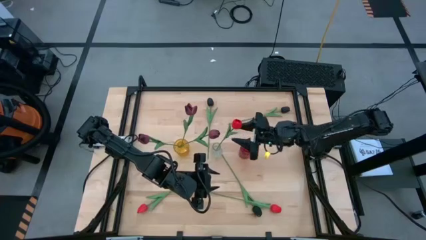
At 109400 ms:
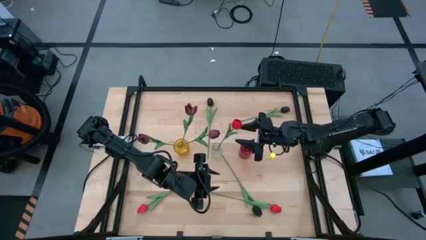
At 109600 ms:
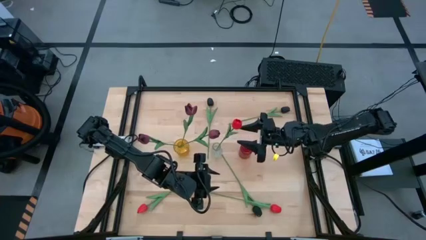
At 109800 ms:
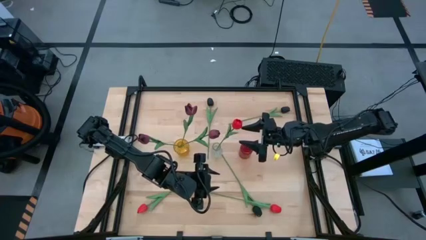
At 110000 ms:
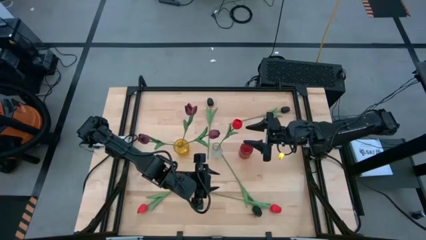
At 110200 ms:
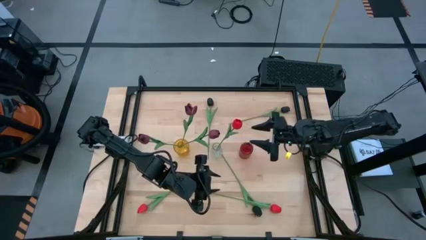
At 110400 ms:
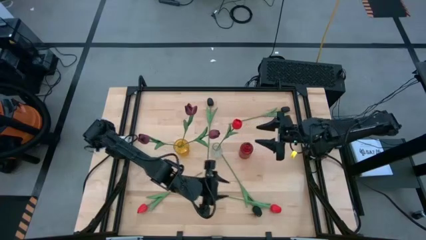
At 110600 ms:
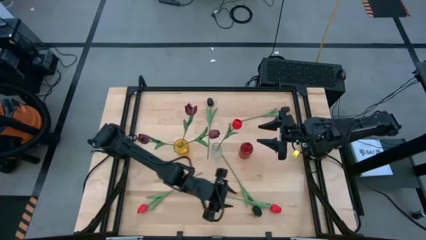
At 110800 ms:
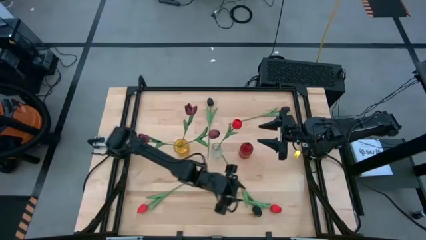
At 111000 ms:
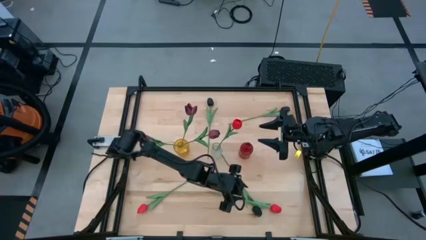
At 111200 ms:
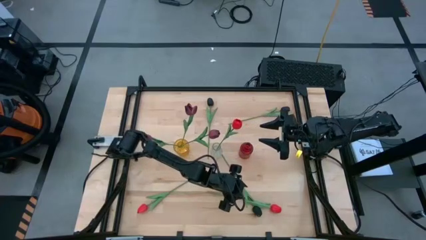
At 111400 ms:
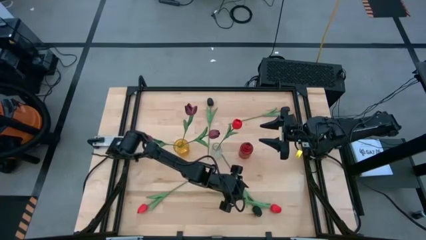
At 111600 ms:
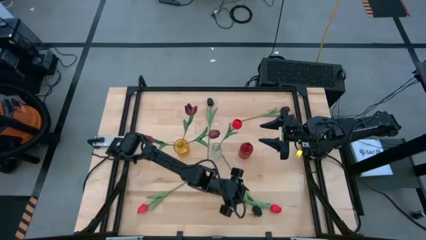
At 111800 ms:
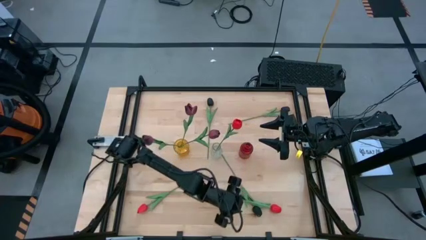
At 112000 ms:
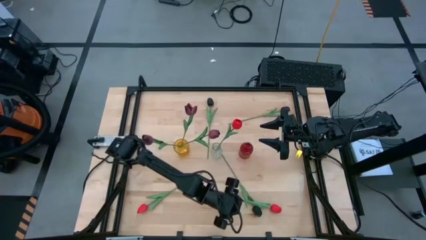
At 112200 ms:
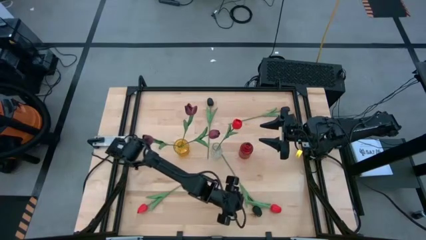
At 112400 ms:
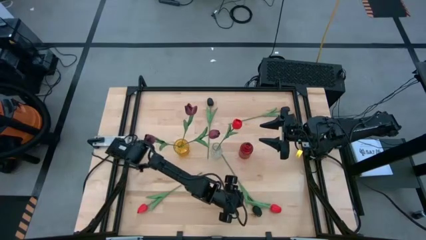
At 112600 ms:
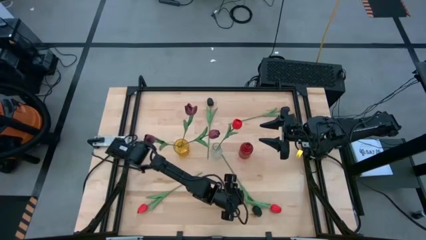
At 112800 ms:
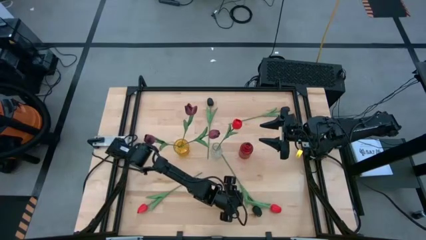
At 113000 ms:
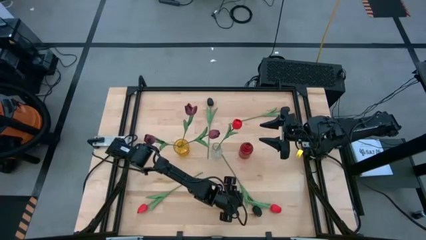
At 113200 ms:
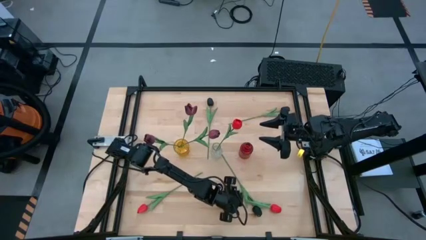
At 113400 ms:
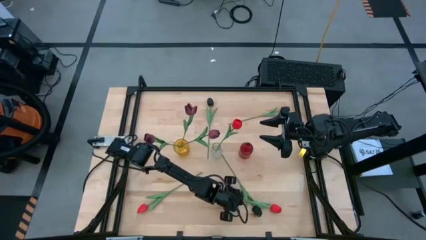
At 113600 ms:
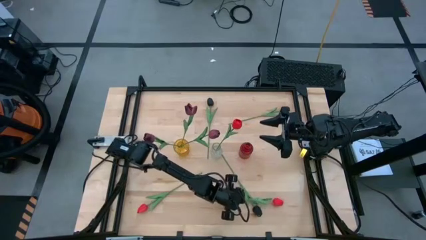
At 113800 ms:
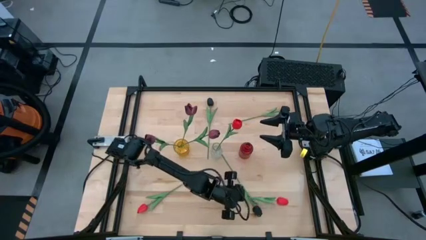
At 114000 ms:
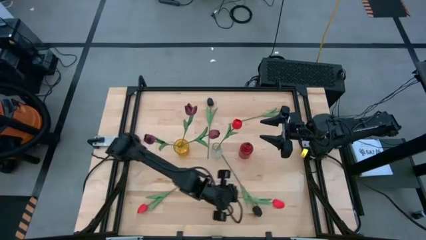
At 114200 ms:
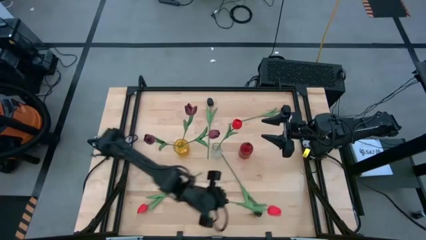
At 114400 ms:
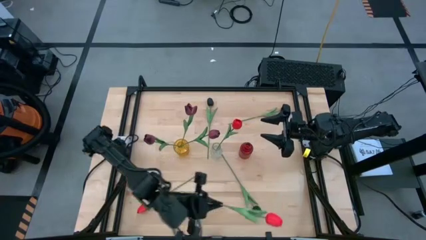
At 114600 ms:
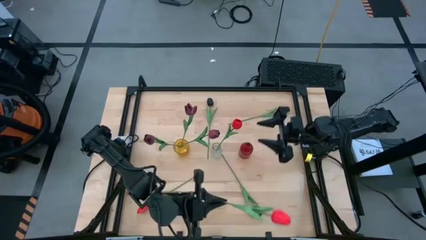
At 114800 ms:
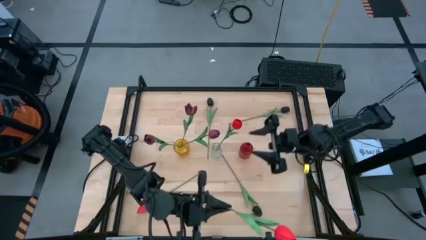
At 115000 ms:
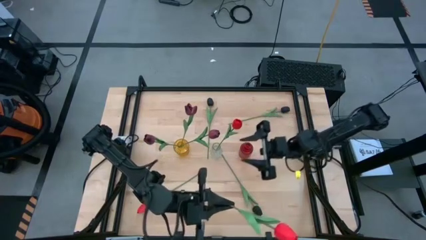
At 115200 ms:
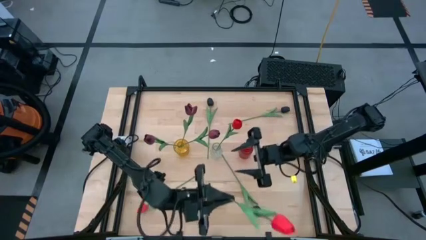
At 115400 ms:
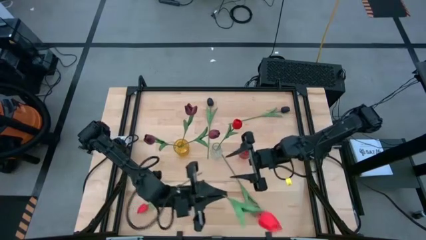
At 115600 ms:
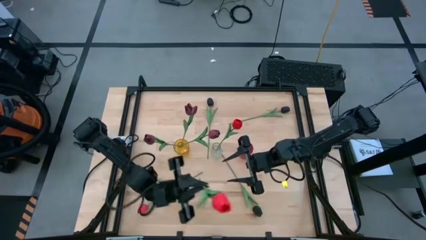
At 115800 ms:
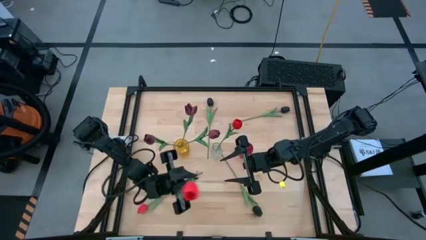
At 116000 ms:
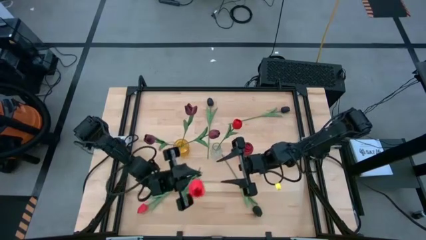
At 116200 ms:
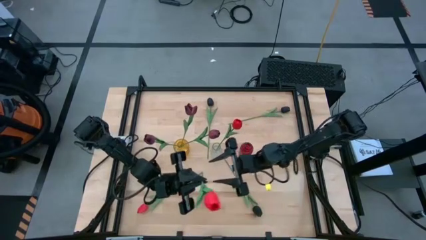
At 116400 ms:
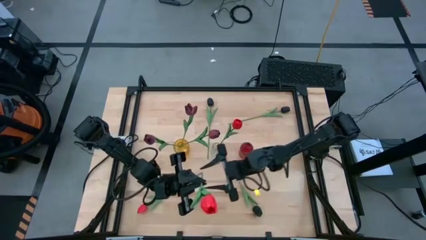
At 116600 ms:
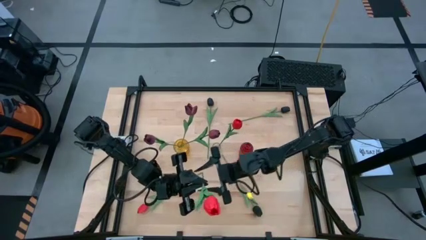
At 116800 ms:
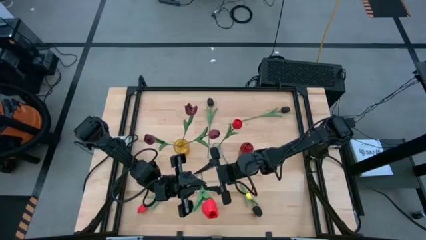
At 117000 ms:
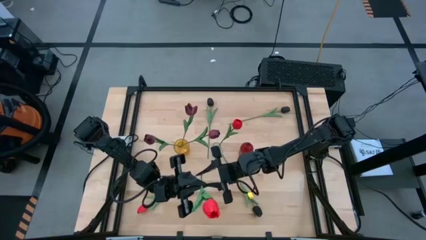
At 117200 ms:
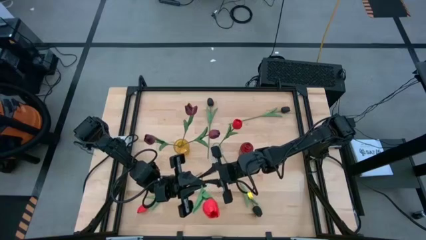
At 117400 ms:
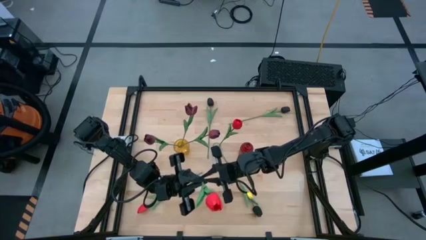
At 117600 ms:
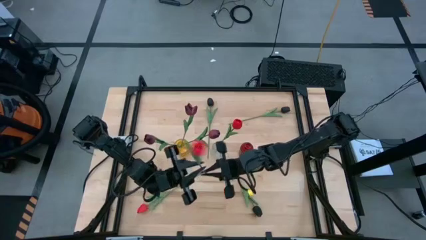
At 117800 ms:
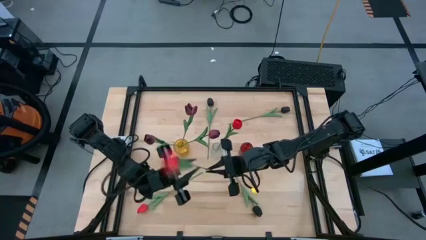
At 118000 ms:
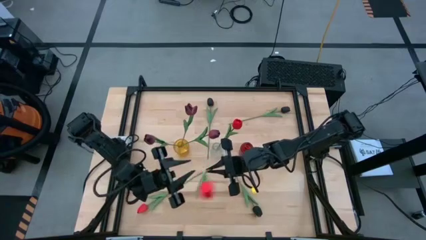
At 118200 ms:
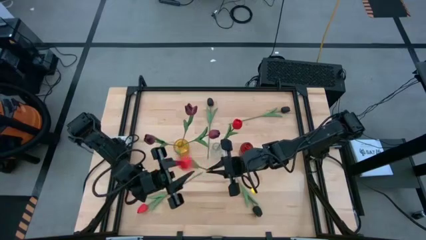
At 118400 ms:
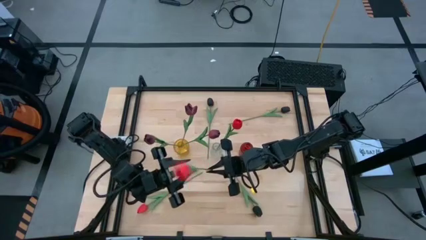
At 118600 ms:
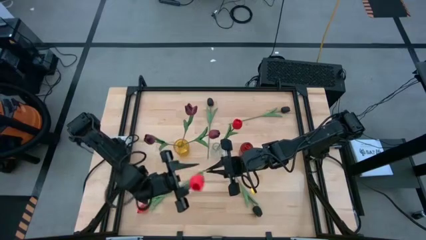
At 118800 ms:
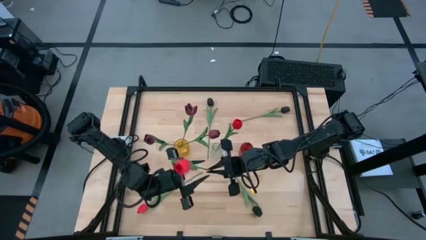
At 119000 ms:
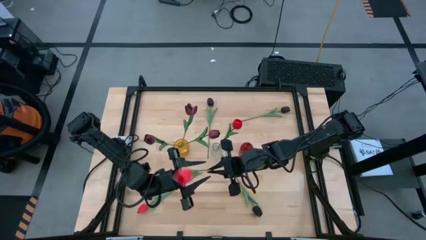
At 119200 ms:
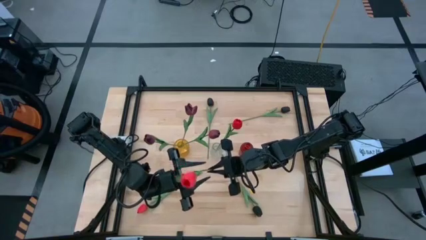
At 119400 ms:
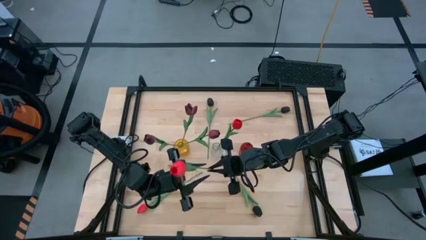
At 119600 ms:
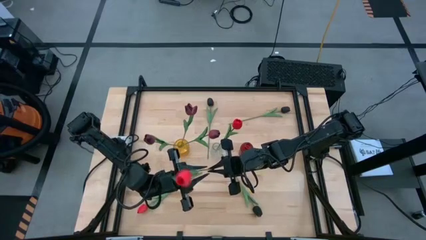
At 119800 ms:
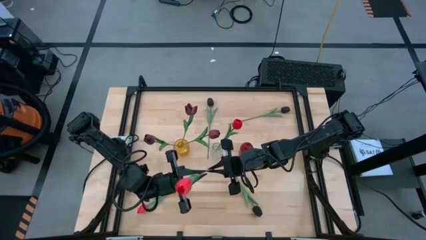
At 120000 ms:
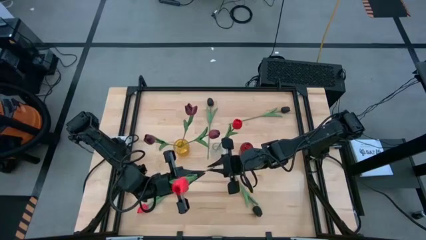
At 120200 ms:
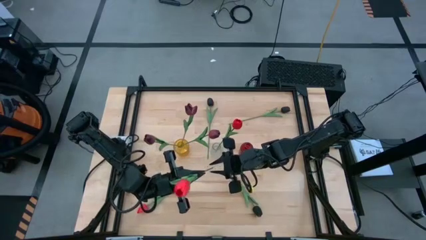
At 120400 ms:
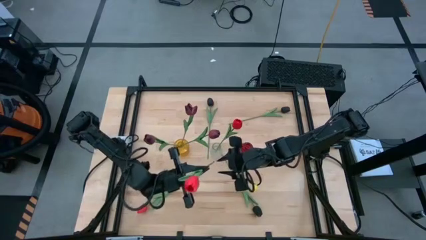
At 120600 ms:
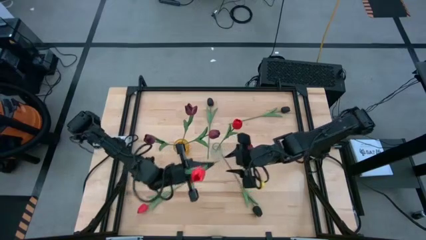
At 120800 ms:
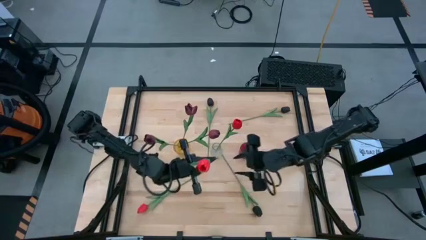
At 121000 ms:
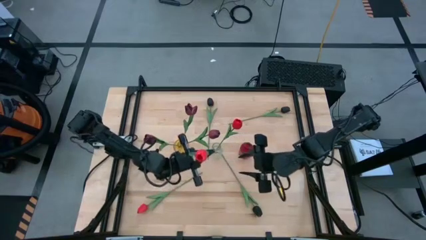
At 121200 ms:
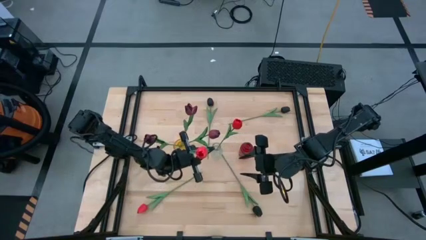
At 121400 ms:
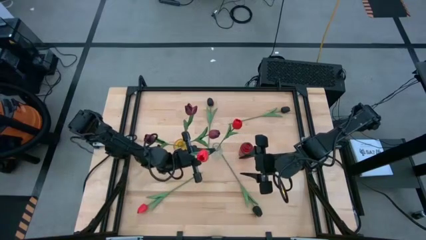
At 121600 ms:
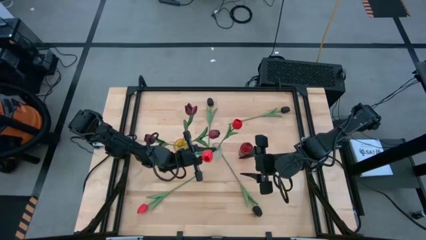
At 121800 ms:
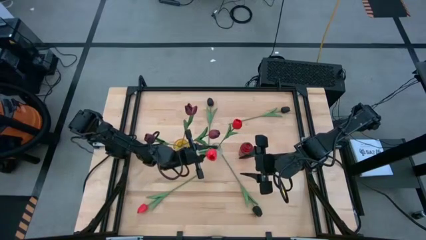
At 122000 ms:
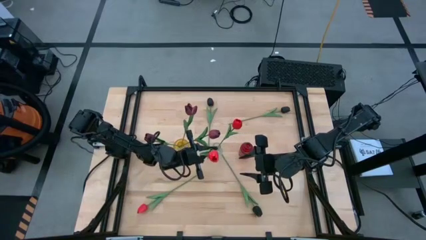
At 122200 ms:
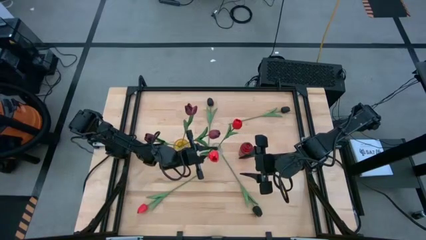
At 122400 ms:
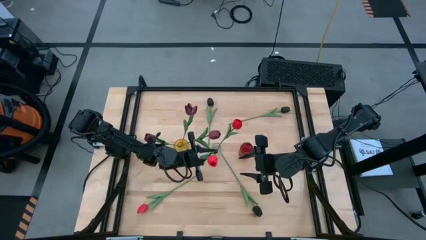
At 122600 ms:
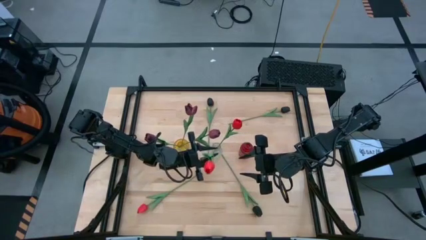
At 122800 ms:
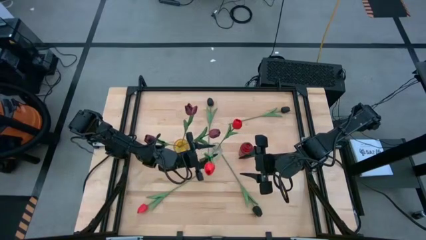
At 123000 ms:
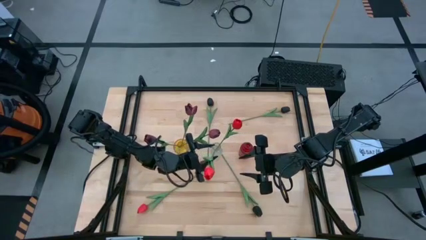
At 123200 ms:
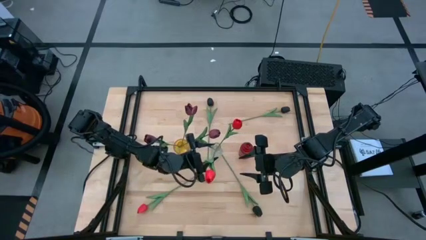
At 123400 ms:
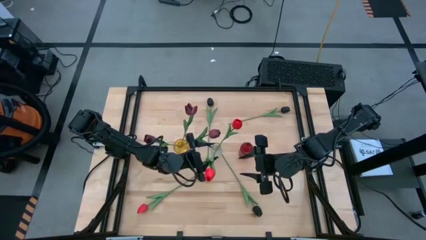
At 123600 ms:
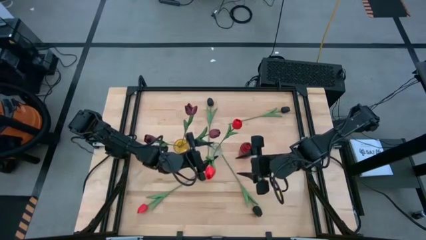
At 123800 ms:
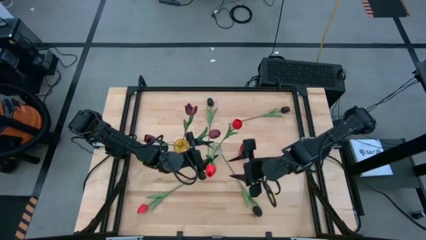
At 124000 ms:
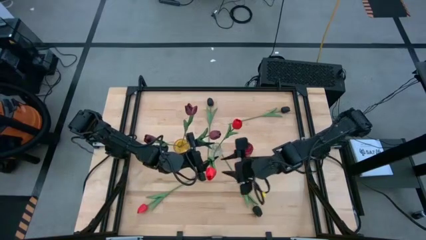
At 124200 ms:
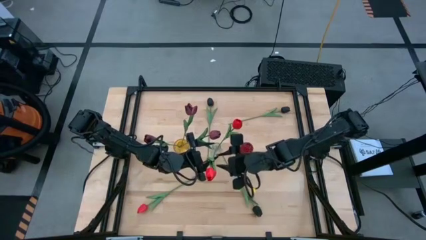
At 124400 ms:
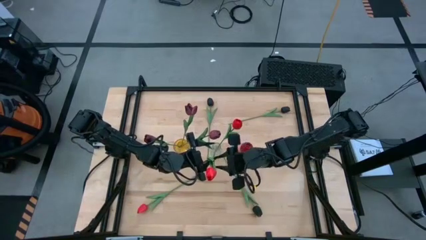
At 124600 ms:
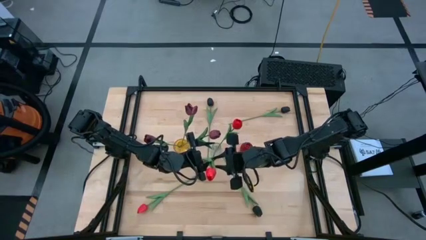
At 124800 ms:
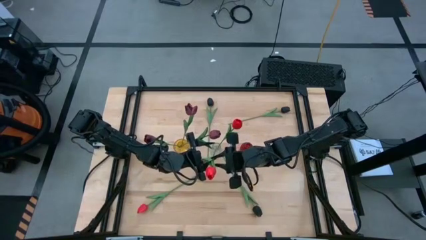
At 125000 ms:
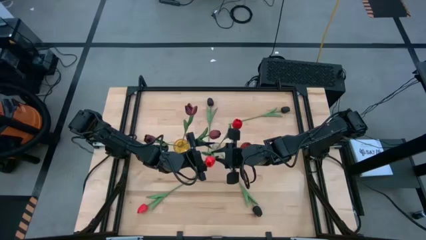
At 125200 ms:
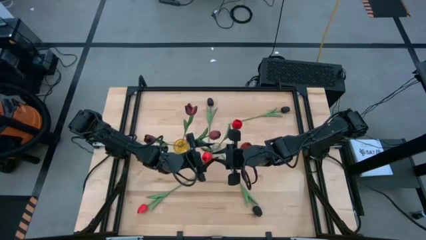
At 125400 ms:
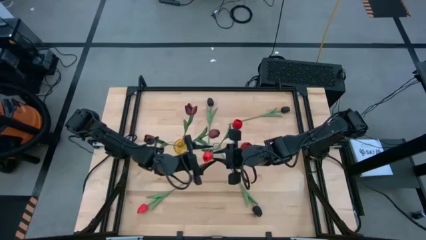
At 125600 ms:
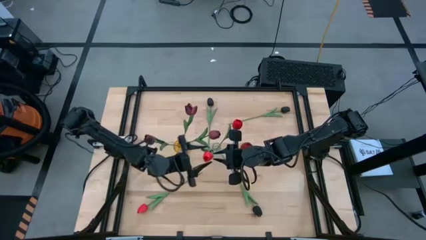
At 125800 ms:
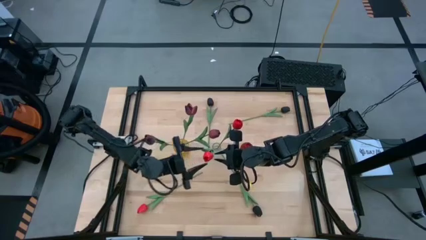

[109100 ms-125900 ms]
Task: Sort flowers into vase by color
Put the right pink tulip into the transparent vase
